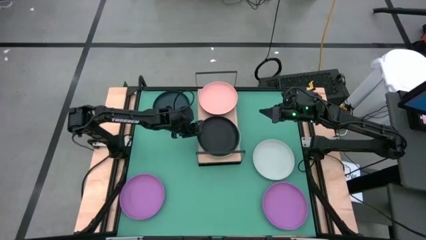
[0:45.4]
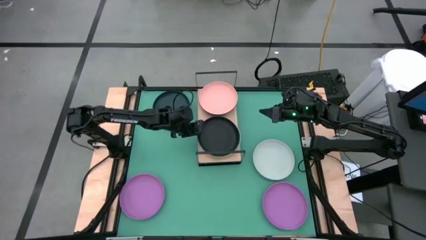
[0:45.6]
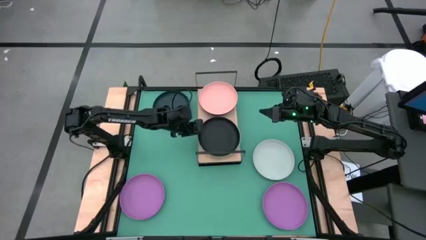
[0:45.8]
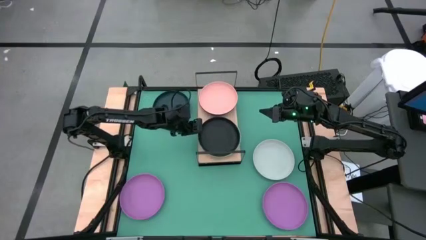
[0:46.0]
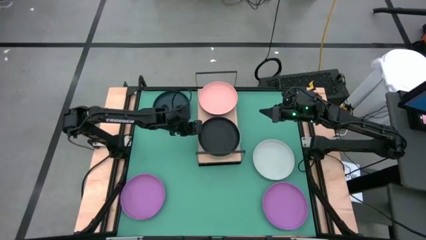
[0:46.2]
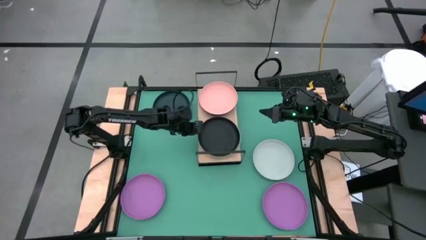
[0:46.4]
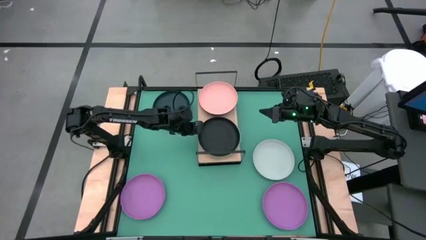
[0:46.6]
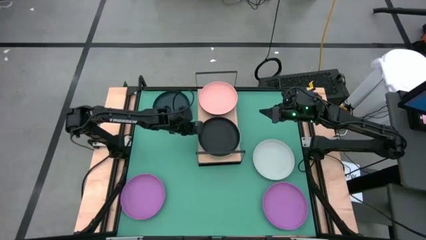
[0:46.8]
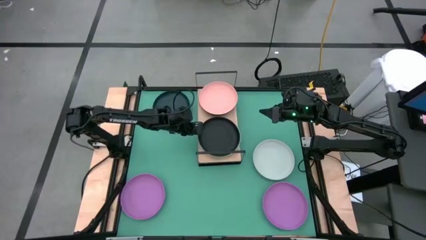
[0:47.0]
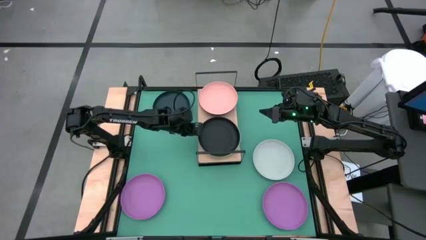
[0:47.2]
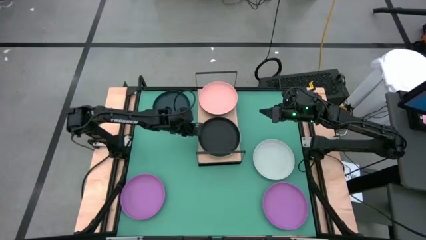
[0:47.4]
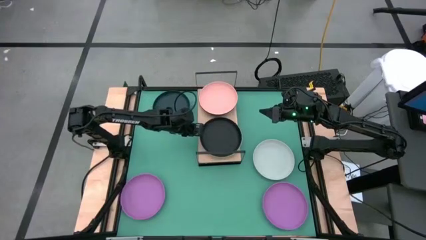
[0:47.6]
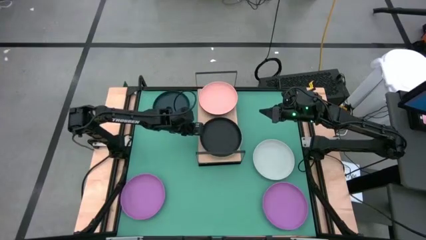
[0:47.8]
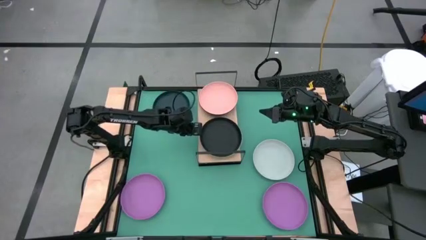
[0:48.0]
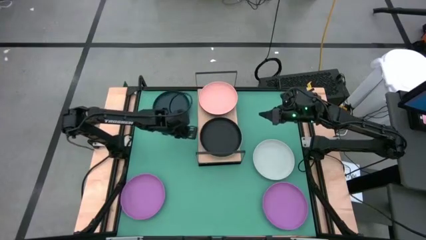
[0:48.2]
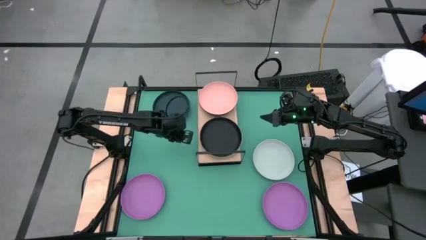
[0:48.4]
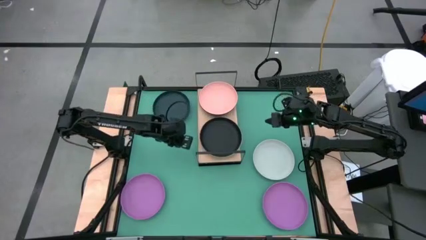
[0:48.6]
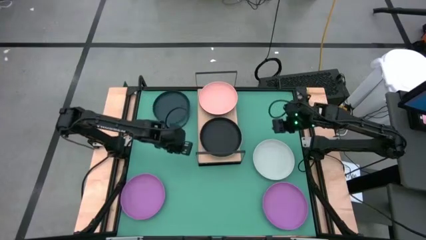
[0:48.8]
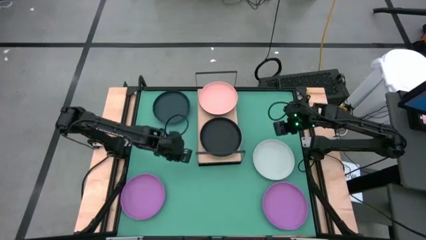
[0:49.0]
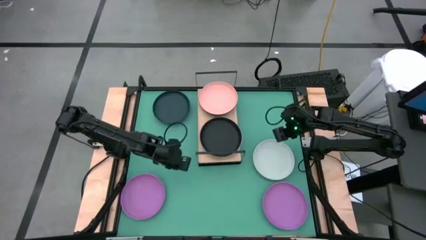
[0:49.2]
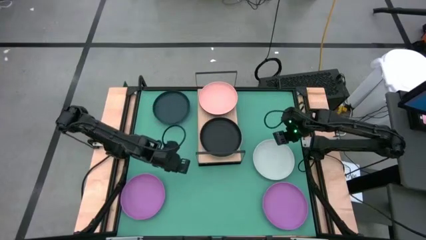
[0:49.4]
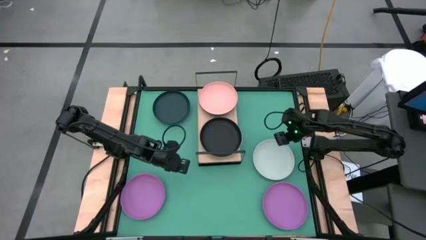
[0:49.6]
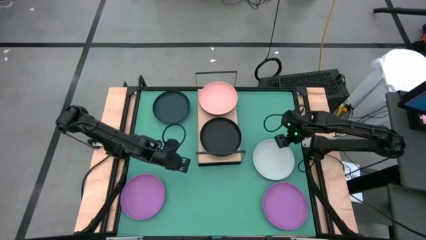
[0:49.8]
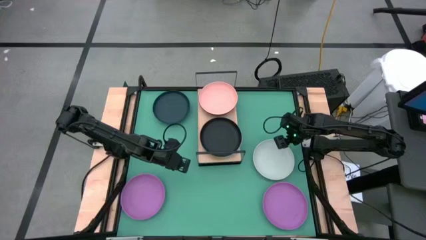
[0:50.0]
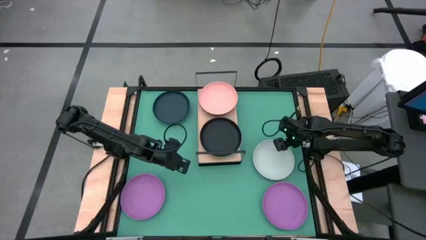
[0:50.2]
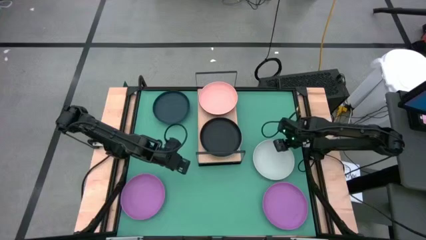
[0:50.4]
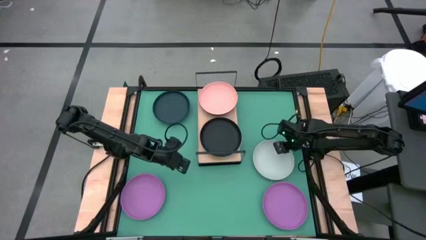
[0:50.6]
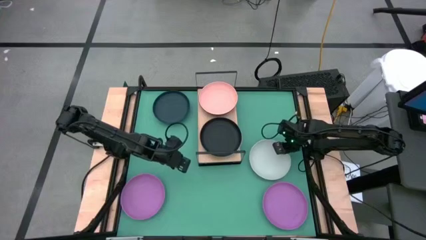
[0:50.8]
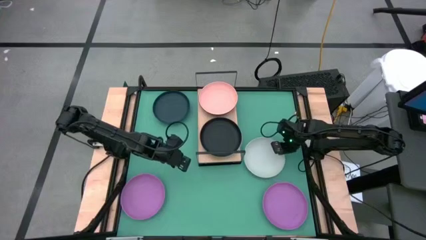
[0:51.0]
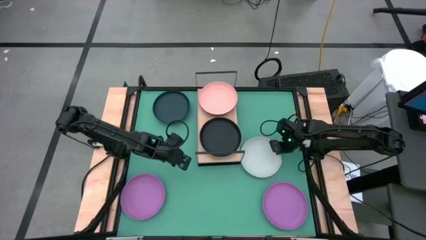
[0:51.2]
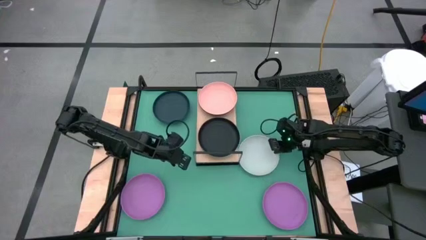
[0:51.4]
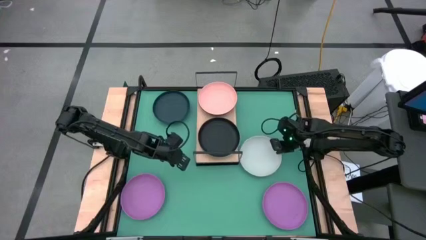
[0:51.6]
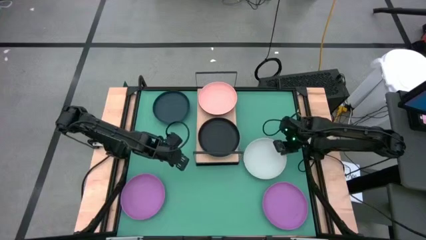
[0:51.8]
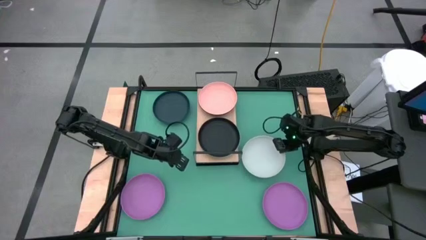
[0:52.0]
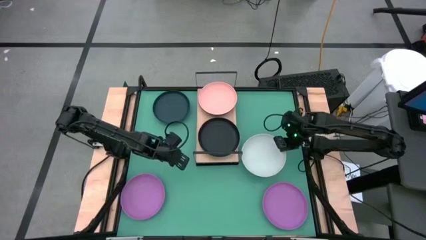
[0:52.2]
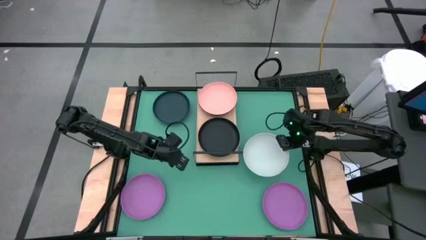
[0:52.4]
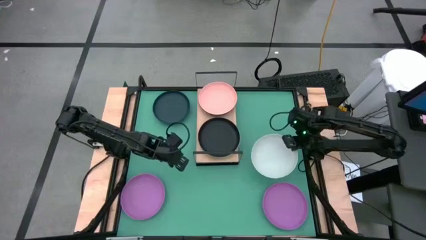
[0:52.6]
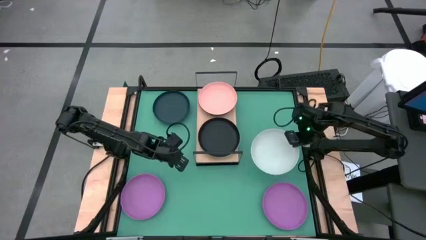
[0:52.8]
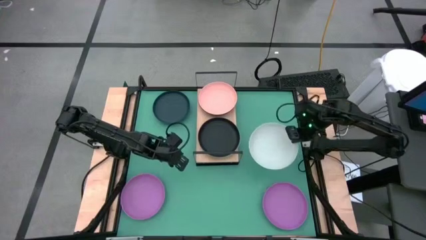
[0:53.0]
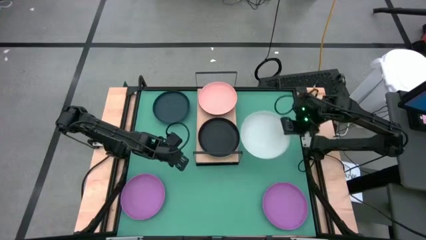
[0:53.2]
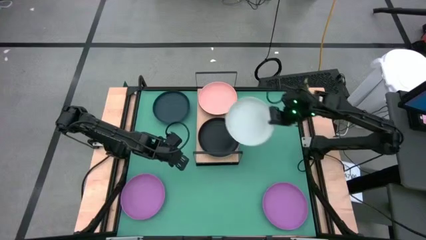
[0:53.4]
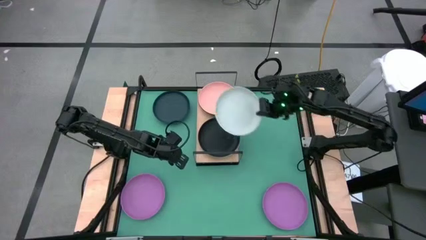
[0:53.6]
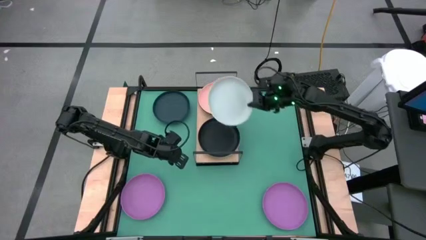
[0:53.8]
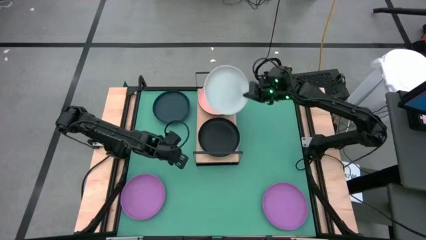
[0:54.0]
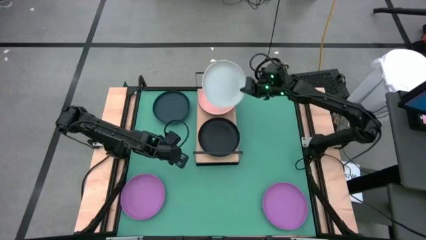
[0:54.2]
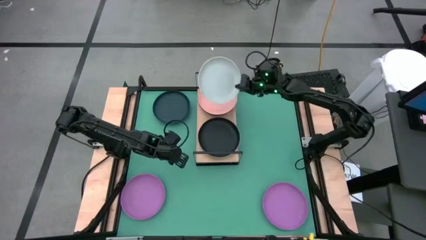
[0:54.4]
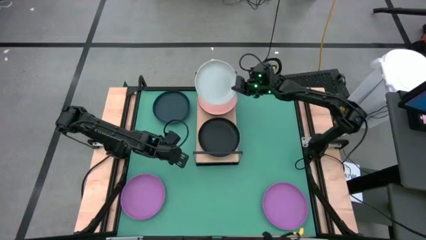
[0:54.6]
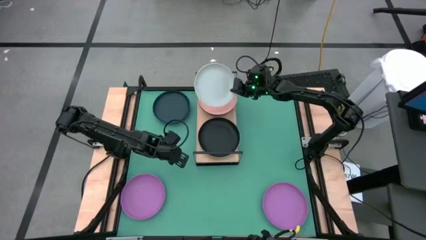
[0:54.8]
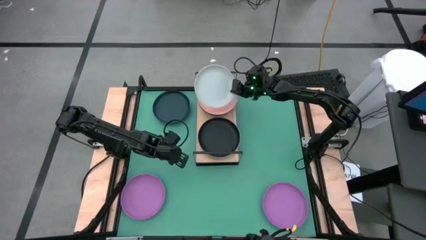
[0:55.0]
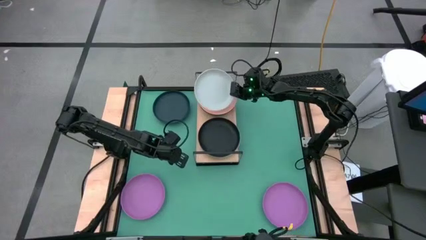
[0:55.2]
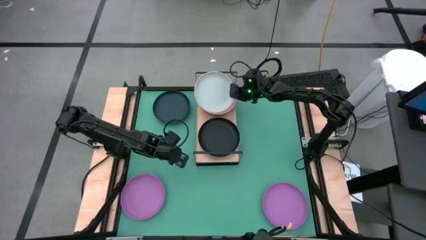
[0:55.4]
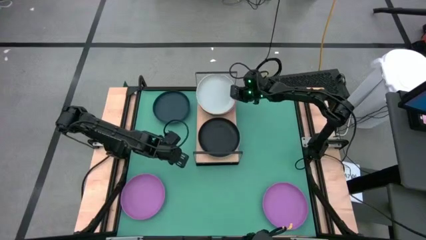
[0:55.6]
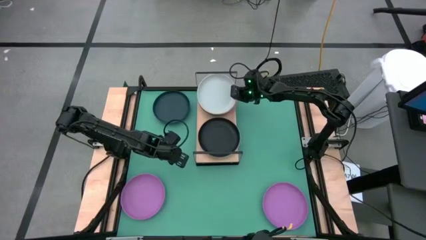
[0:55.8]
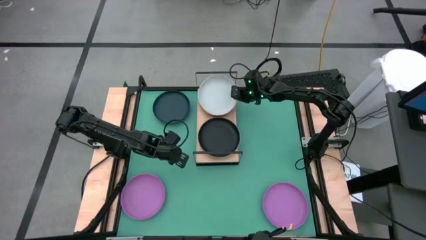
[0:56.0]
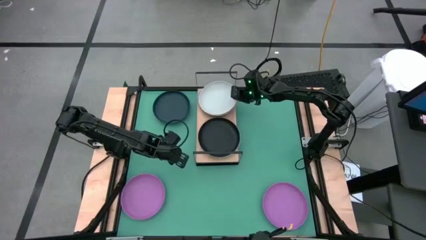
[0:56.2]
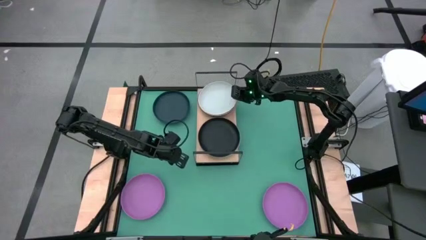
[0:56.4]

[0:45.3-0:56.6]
Task: Place and stack plates onto a shelf
Stack the gray plate on top of the light pink plate on the shelf
